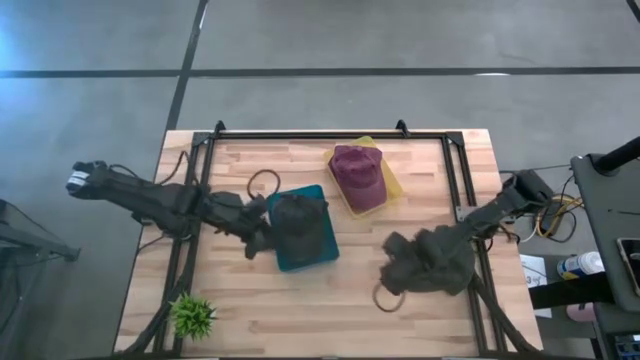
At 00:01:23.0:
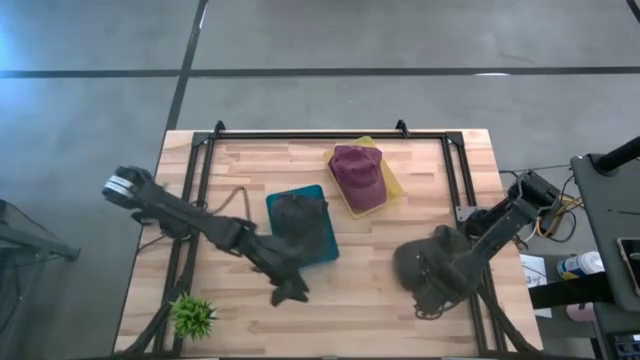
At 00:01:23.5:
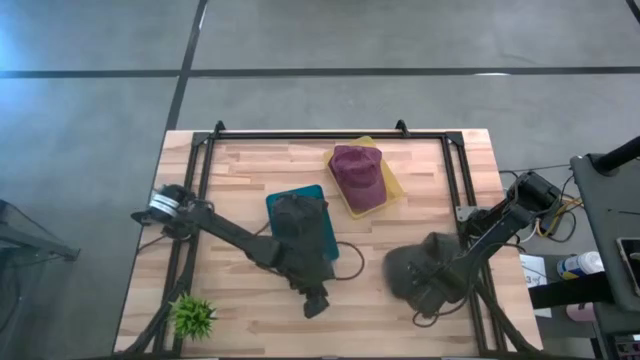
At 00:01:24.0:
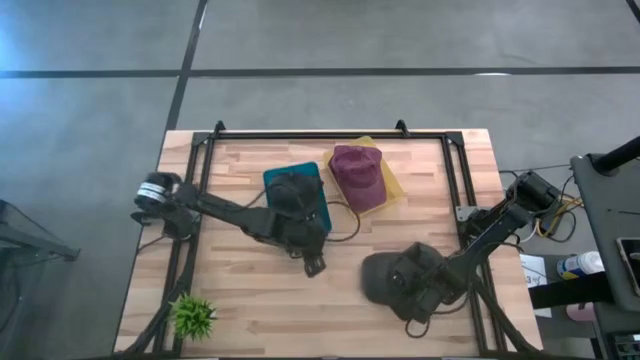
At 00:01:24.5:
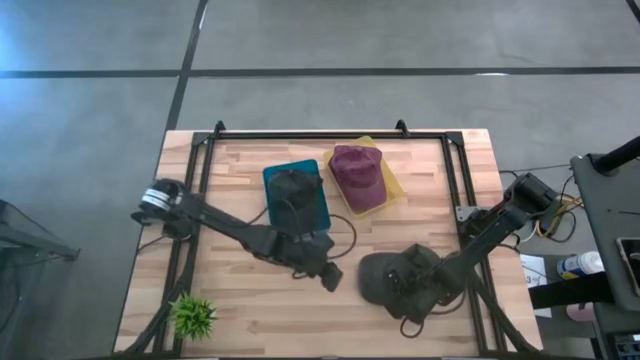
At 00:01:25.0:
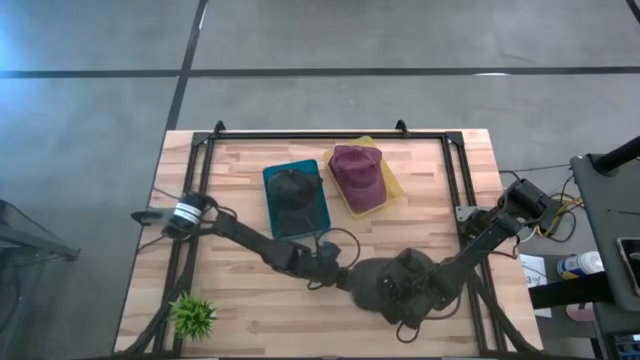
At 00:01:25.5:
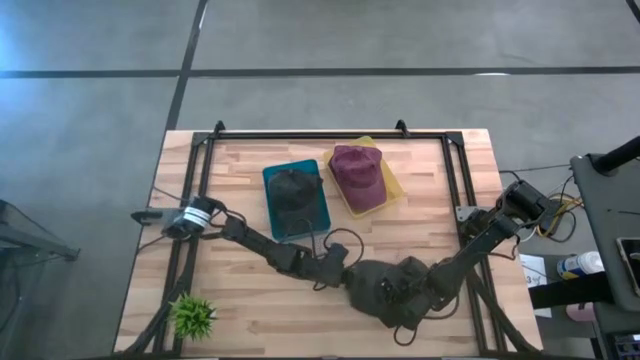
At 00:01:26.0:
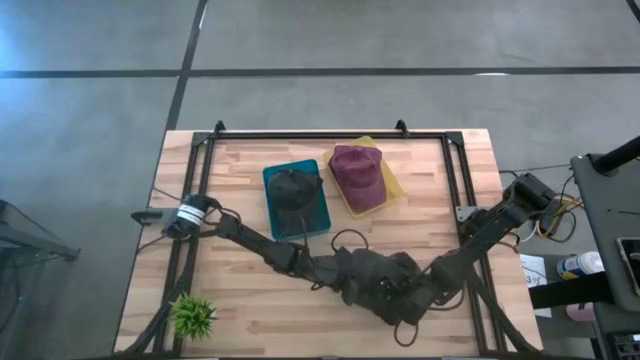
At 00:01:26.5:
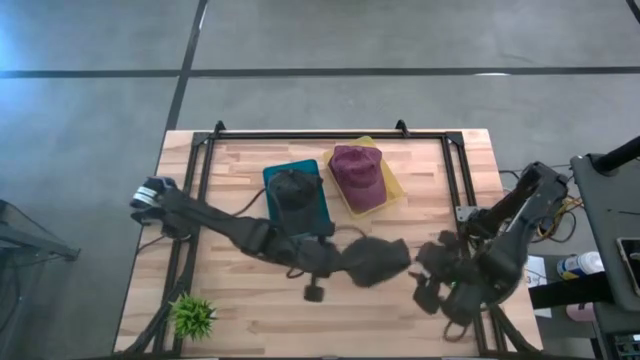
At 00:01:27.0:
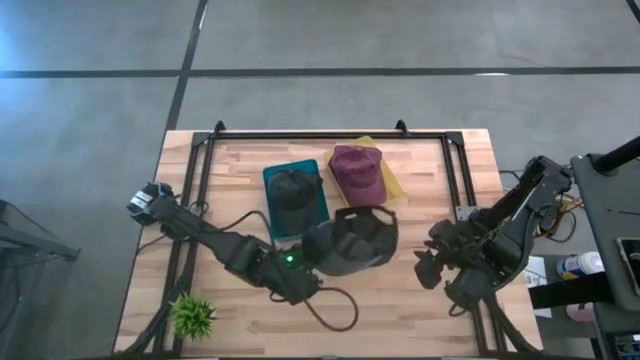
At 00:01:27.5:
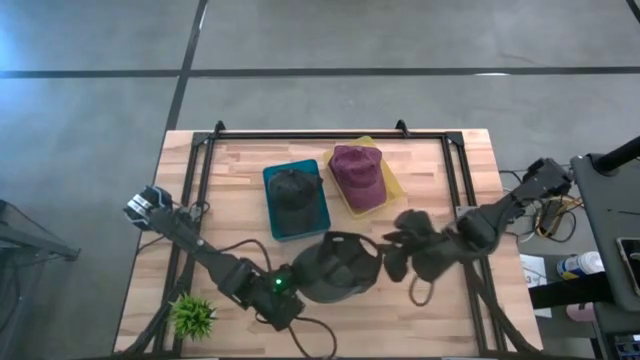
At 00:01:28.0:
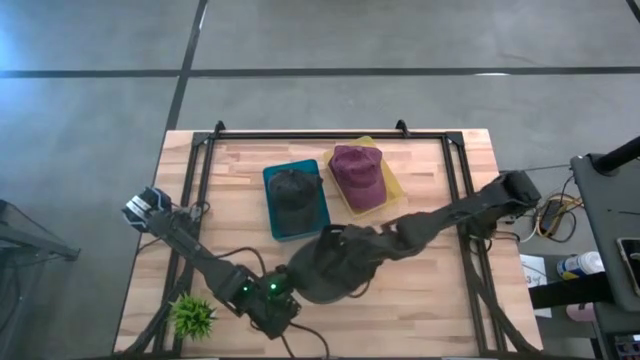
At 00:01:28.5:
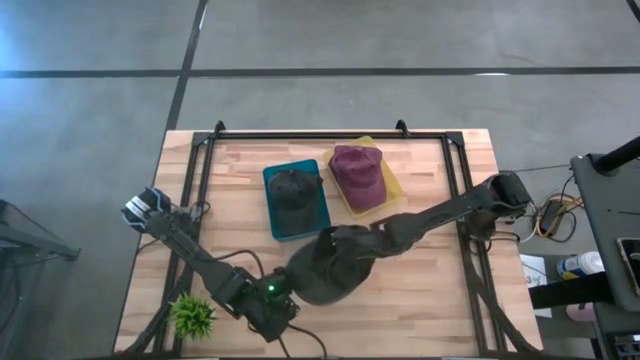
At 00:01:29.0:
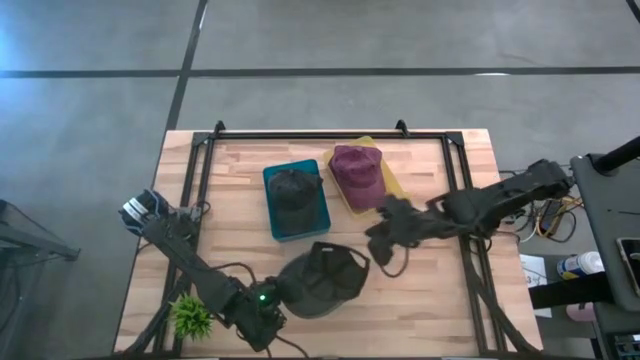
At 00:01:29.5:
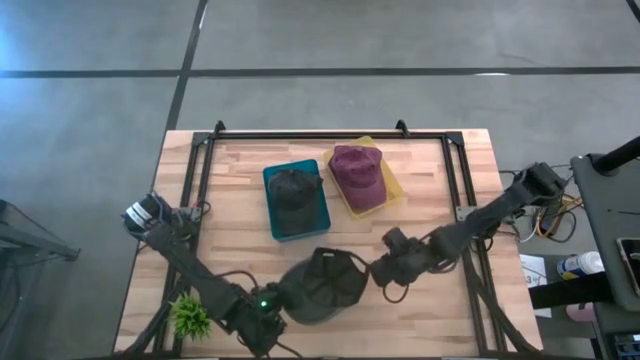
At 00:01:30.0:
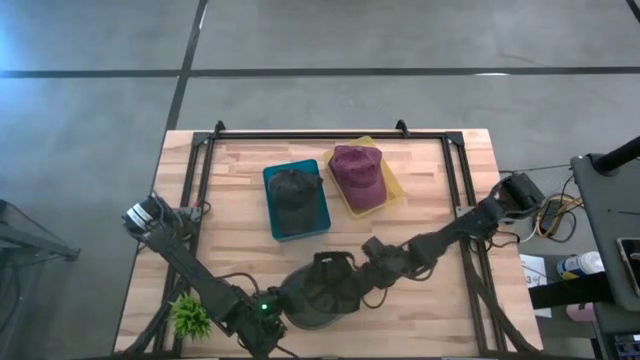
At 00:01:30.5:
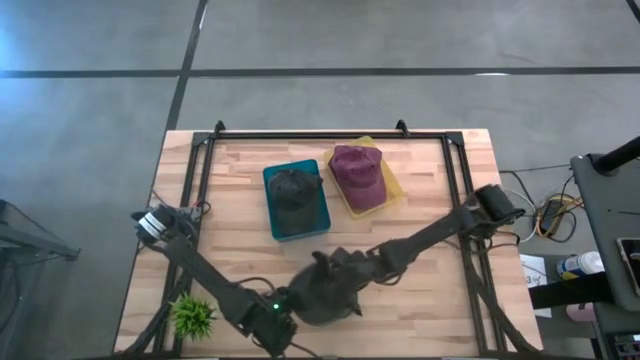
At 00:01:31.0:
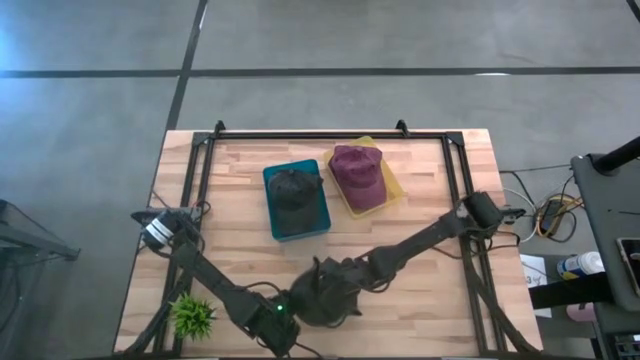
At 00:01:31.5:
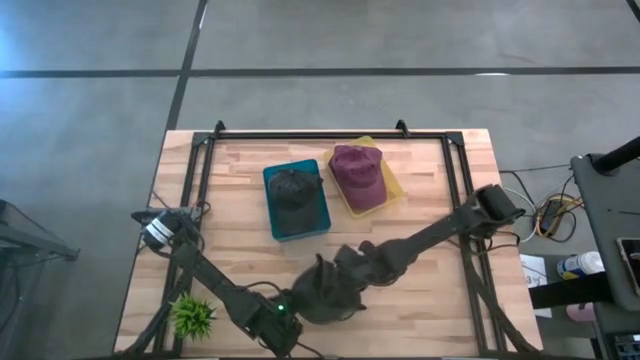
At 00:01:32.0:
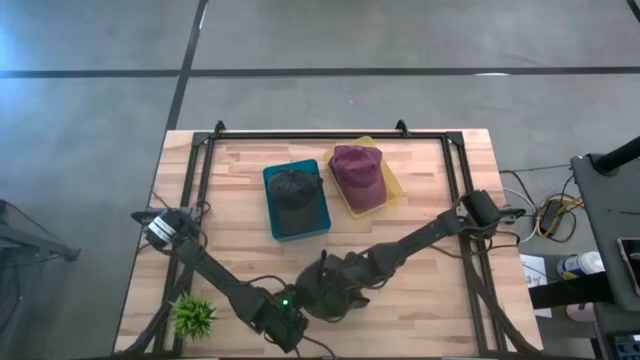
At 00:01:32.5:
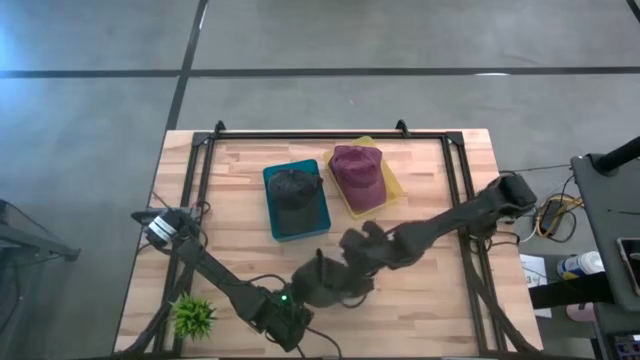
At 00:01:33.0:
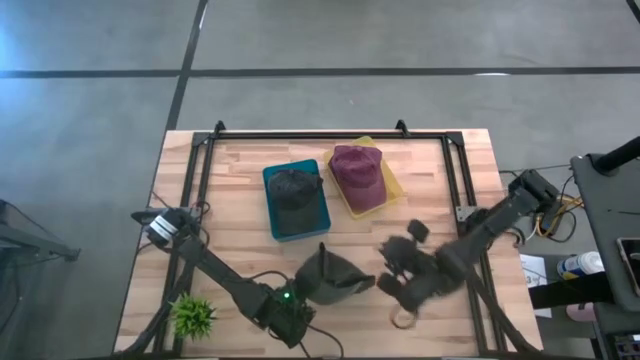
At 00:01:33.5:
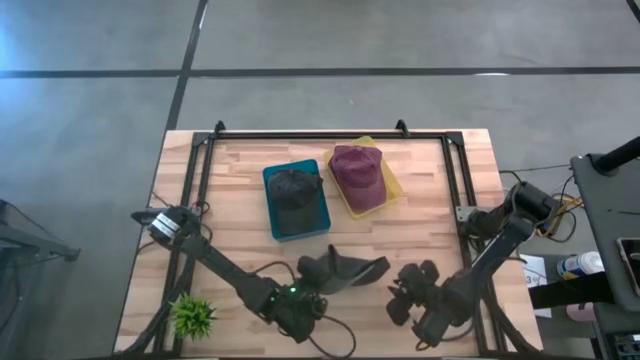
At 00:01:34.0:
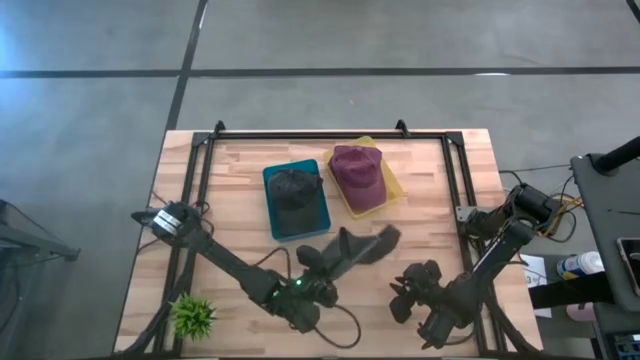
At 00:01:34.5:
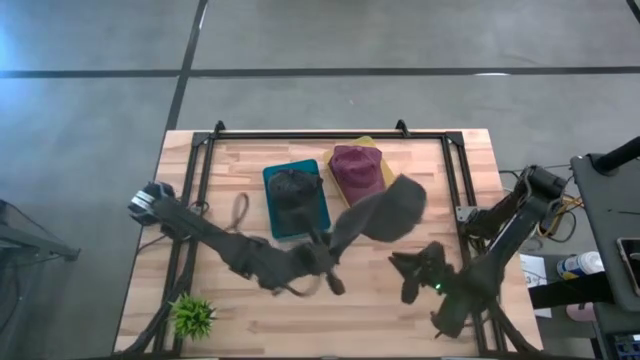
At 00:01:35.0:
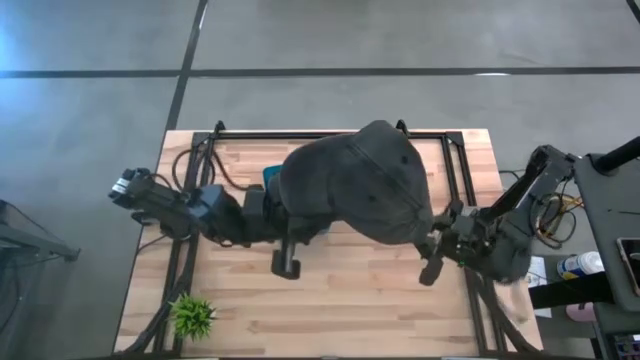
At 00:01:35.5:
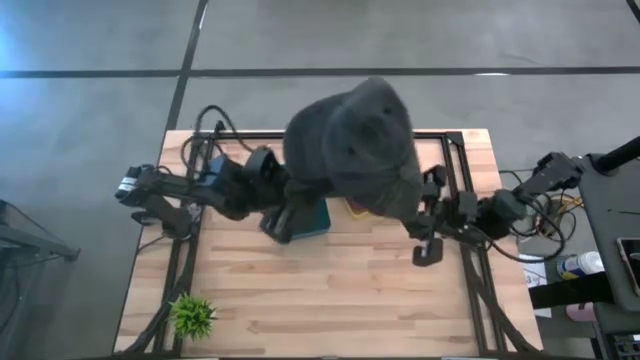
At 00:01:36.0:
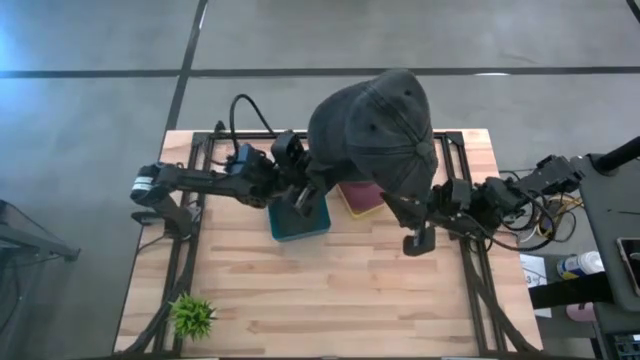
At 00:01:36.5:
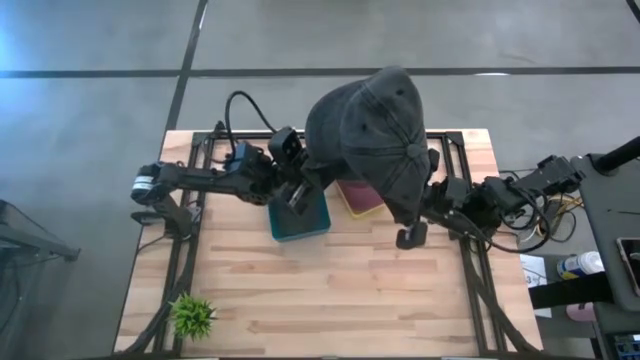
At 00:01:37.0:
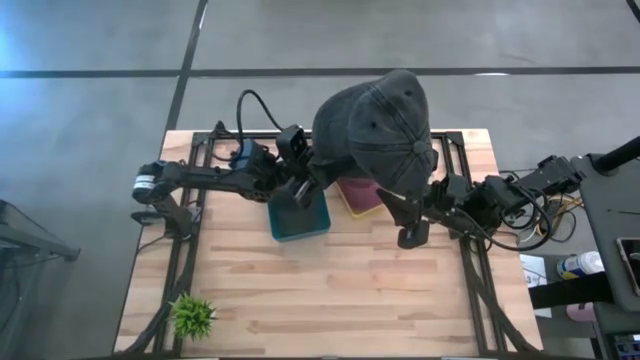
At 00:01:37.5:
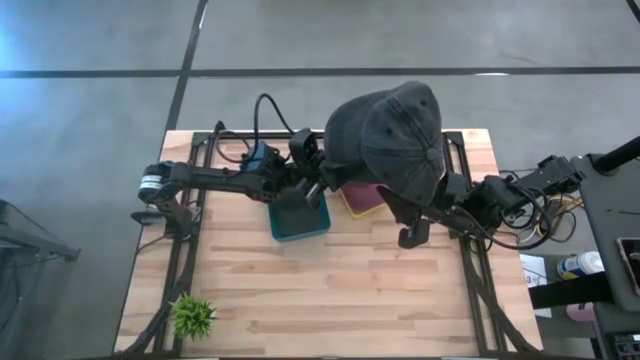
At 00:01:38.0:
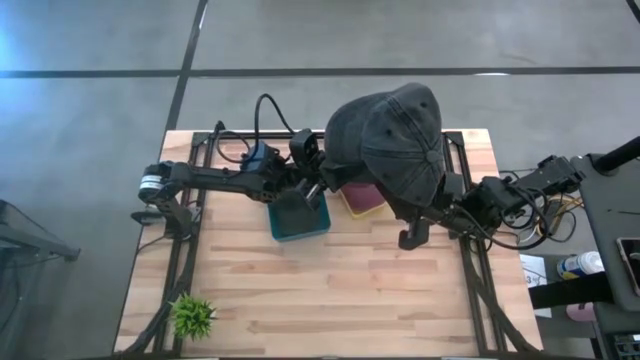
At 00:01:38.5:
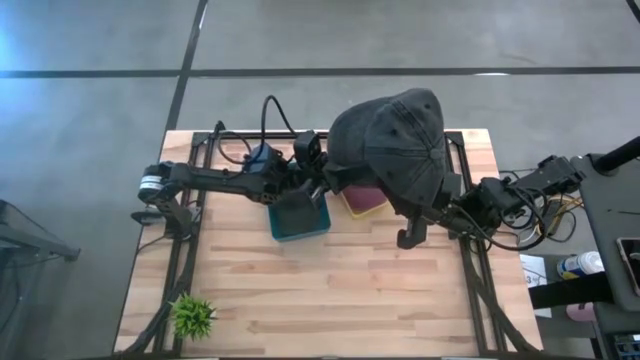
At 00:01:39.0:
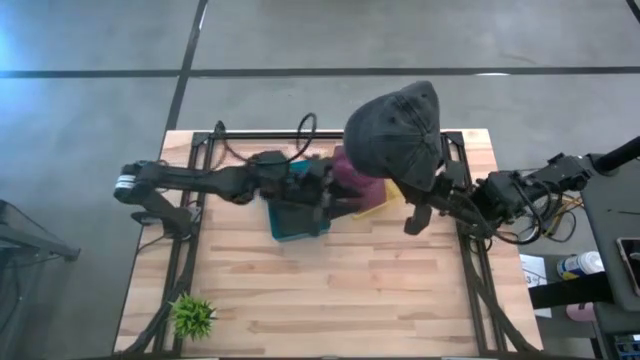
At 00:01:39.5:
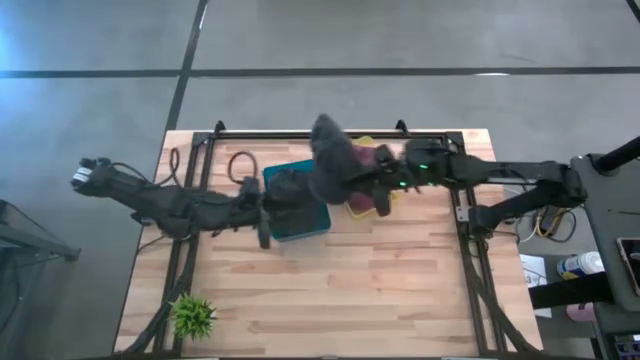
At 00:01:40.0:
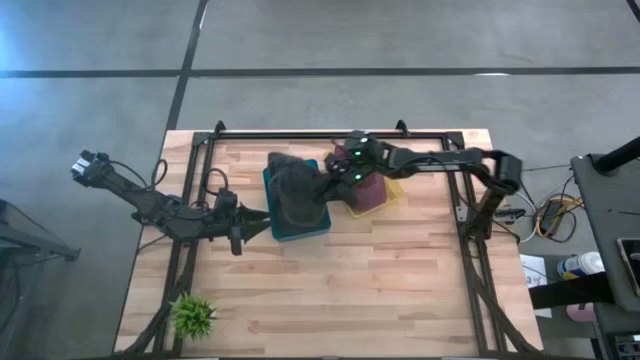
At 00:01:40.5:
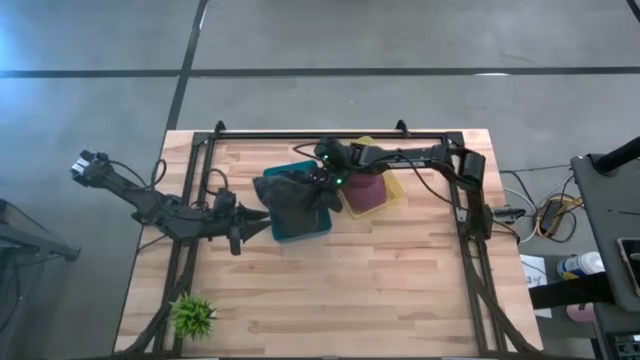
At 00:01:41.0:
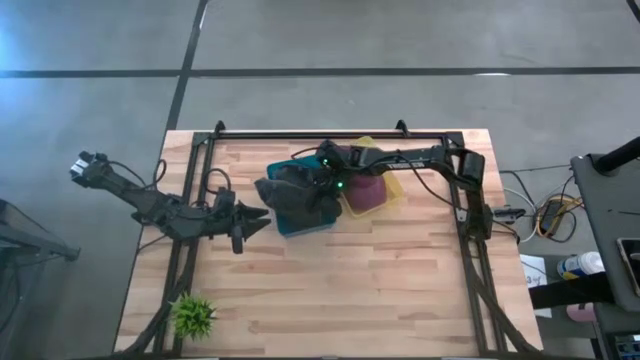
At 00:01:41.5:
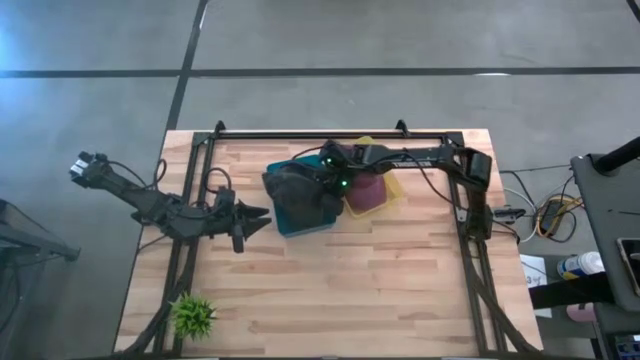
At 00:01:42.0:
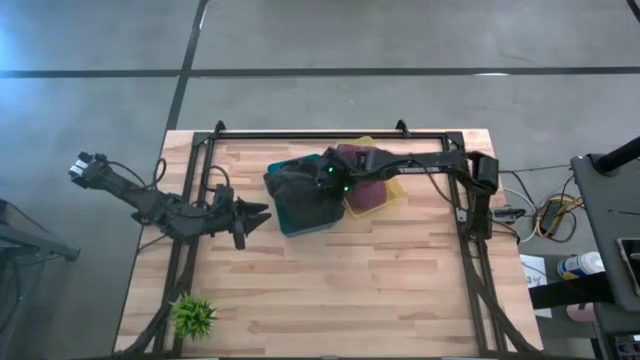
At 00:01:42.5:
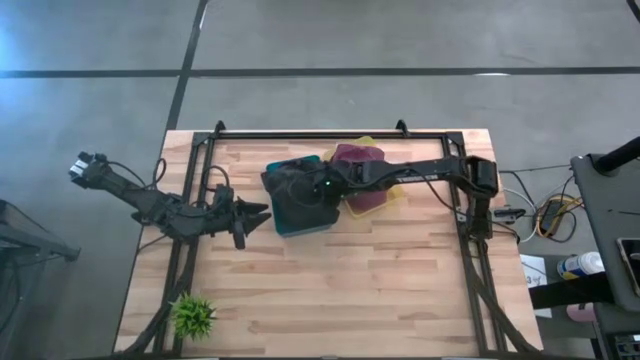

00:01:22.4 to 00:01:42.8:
Task: Pick & Place hat
Put the black cap into the blue bin
